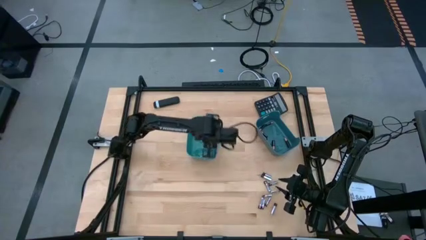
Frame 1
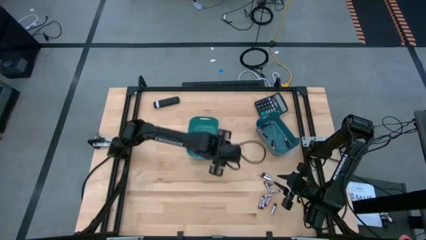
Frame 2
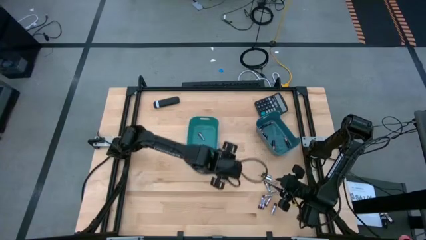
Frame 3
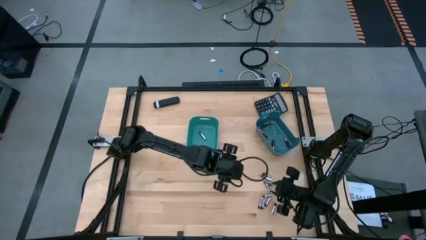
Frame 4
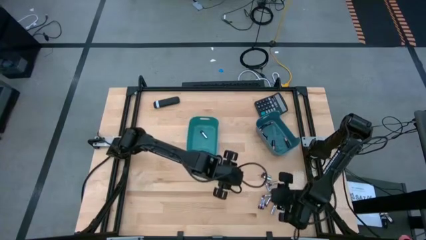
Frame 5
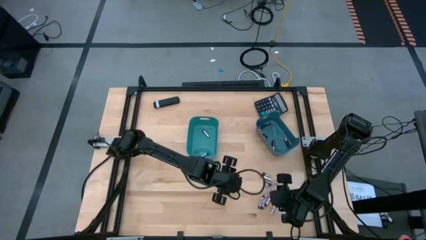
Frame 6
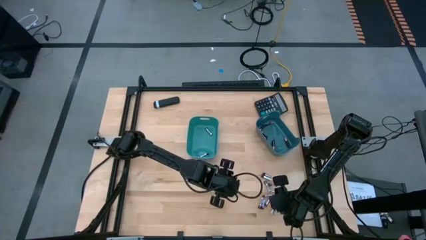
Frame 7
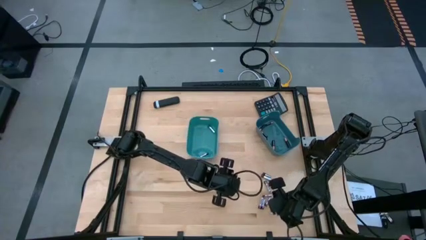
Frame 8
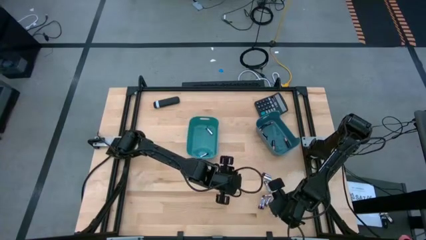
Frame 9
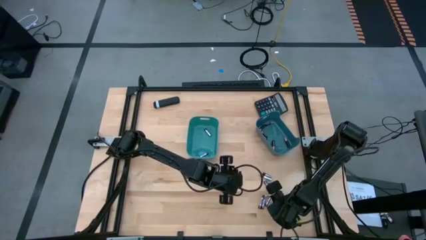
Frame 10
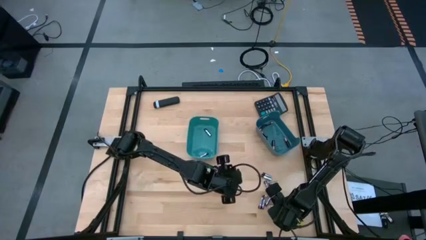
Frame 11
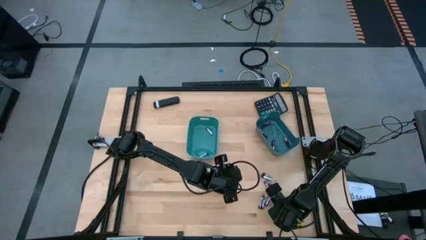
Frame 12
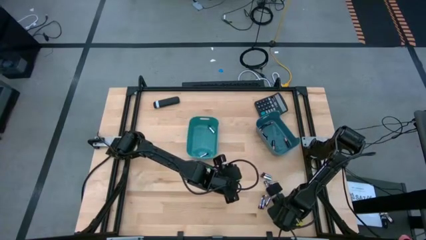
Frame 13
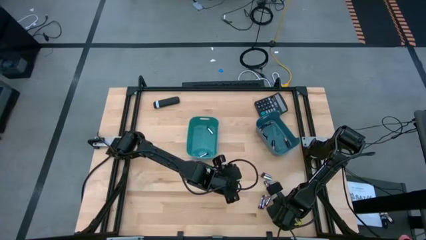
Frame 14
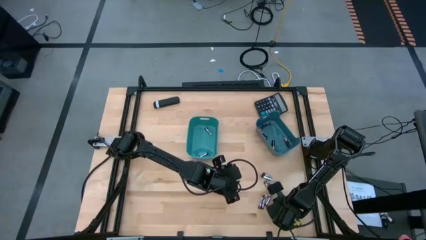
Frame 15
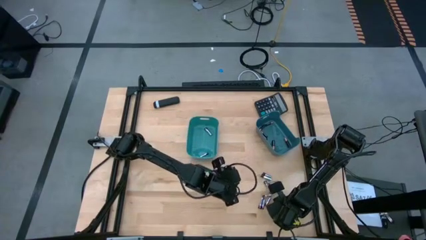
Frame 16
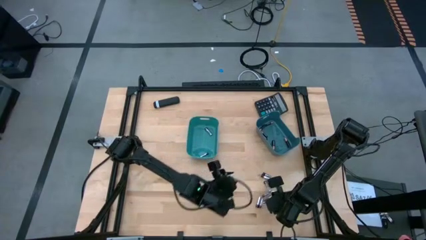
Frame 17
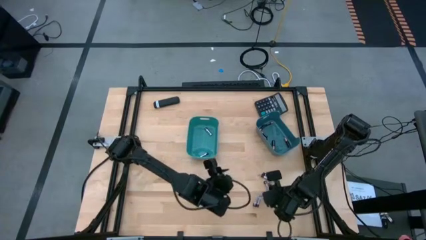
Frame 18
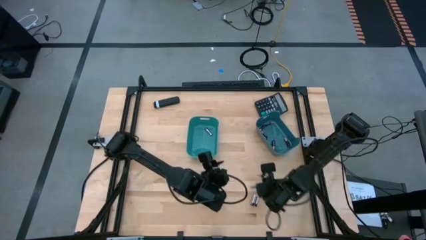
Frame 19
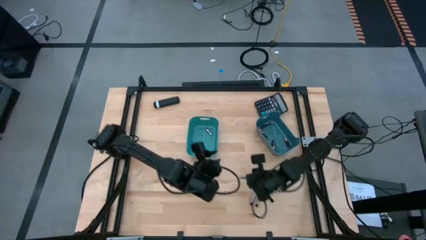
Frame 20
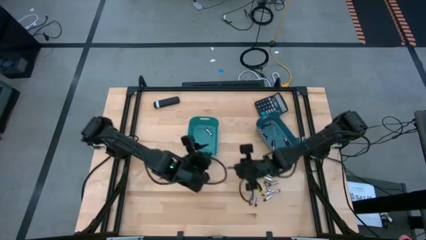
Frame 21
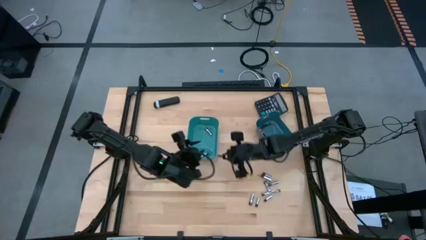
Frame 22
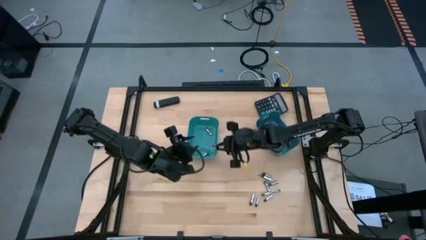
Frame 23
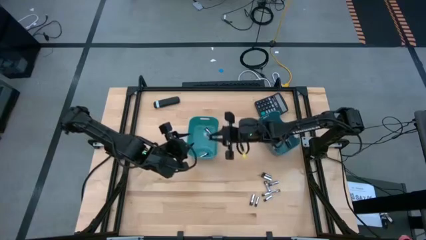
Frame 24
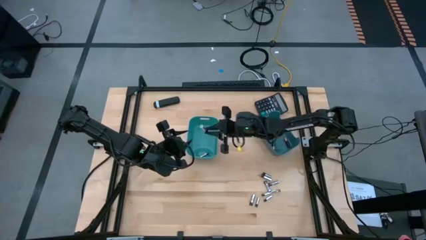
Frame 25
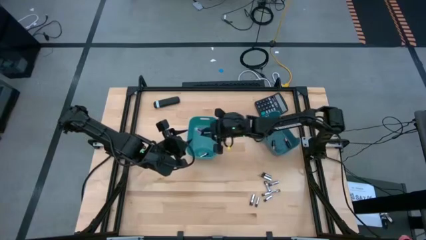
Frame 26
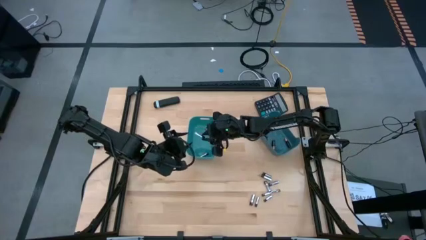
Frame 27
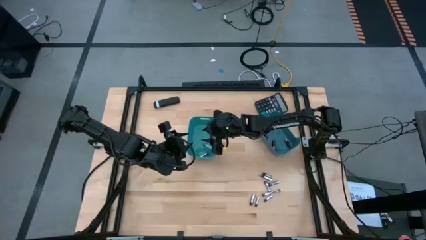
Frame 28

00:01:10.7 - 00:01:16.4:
Task: Sort batteries
Put the silver battery into the green bin

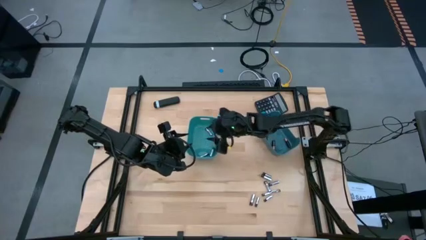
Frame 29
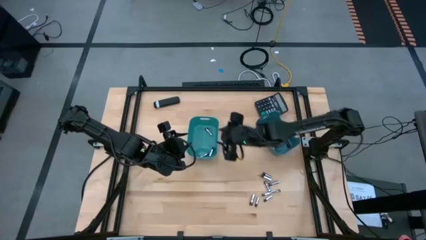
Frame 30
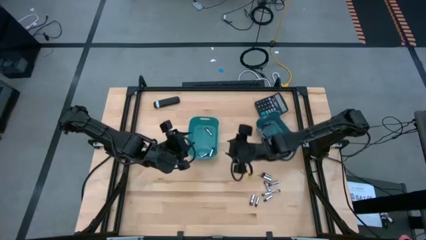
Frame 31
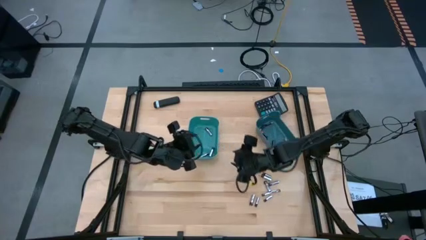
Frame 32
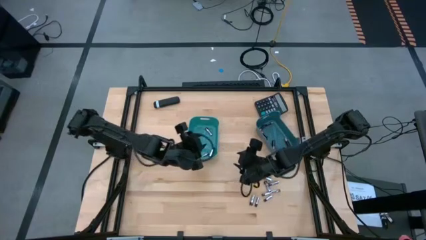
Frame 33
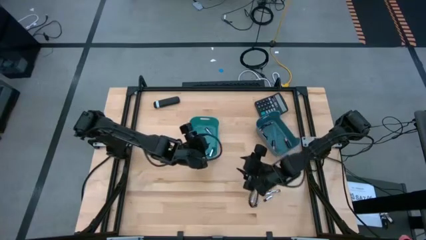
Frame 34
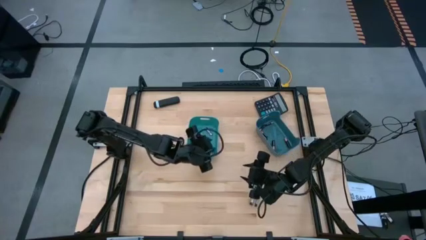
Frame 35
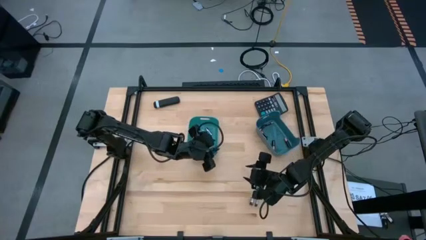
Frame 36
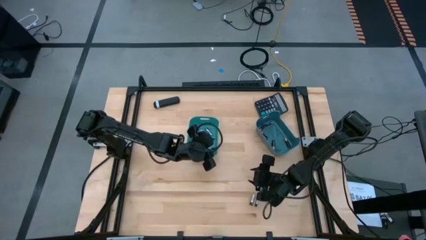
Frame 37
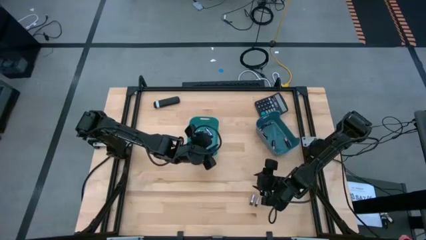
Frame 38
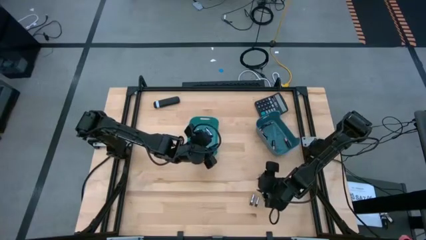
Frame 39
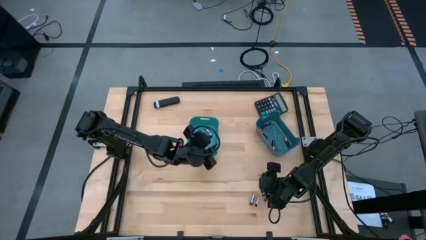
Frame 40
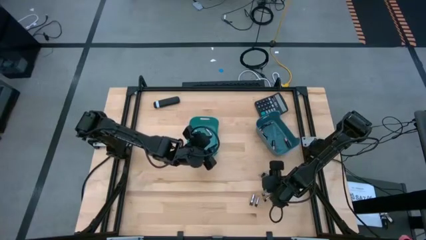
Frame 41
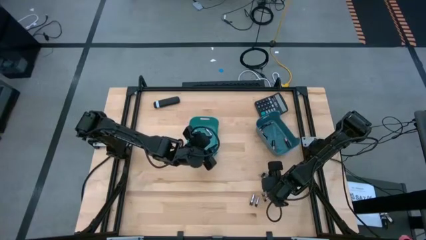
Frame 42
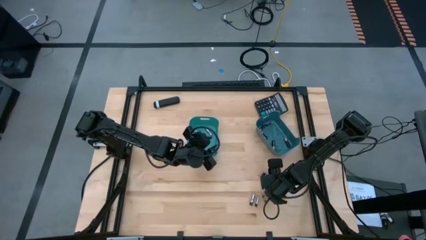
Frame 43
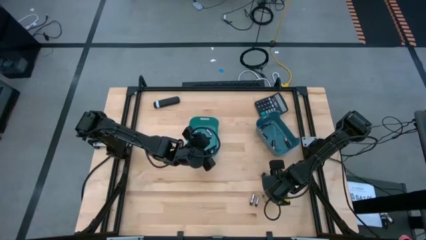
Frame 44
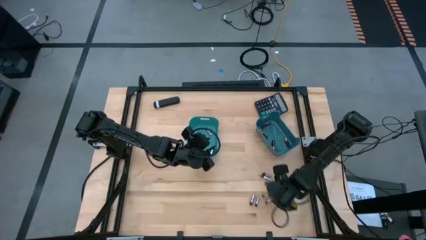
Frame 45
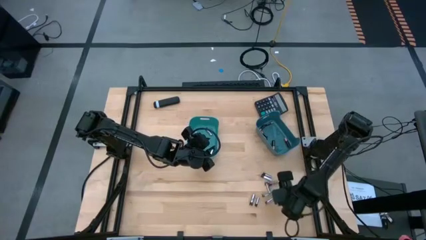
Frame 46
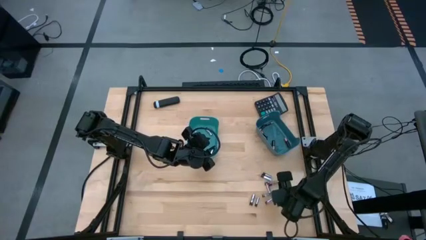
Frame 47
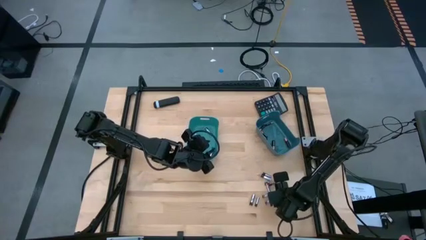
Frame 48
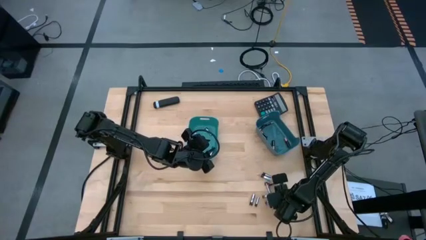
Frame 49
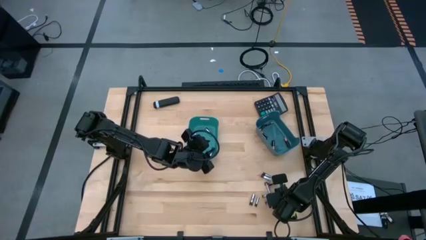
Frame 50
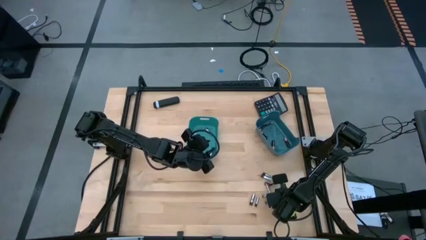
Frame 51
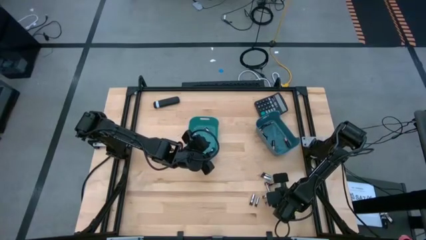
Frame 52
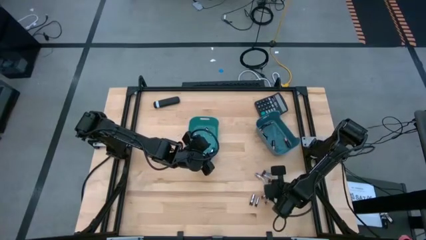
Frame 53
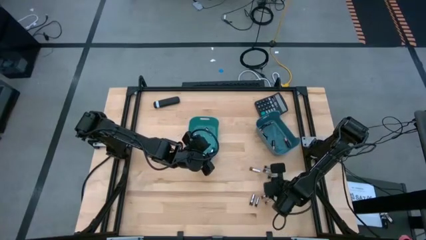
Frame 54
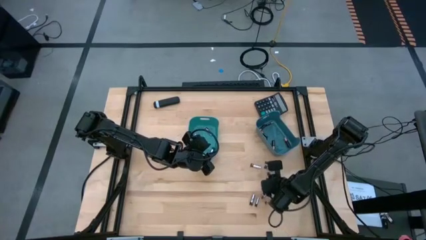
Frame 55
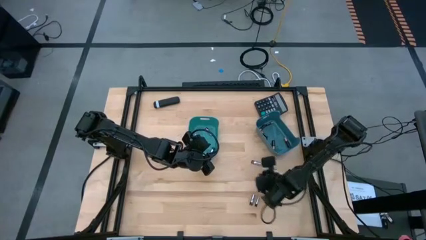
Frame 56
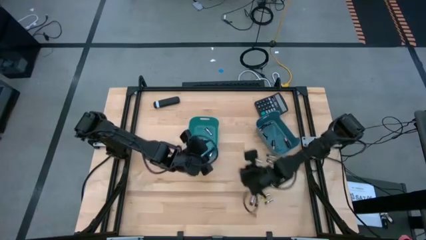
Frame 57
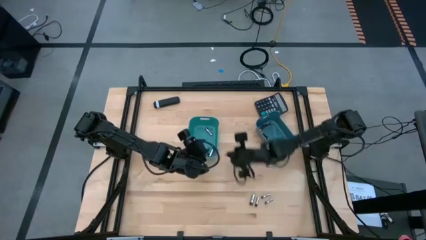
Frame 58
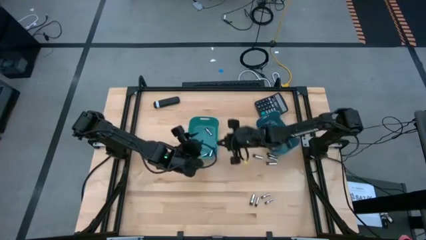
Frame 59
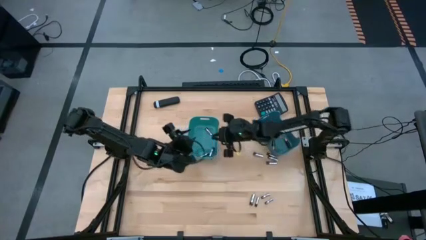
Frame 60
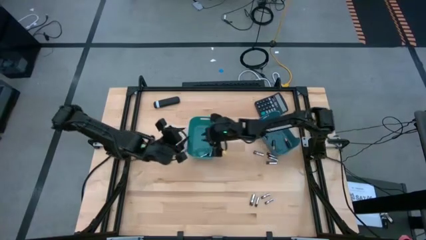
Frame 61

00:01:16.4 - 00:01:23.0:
Put the silver battery into the green bin

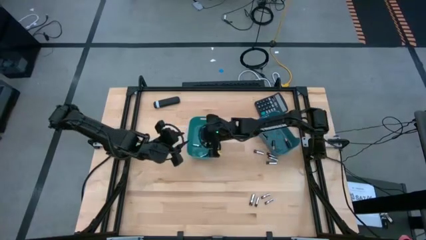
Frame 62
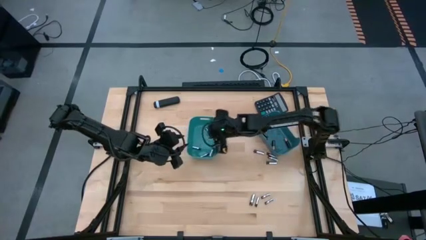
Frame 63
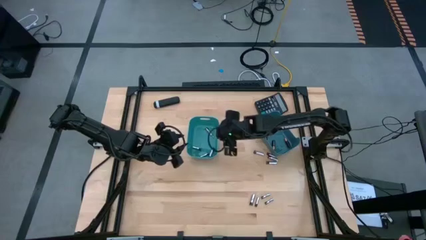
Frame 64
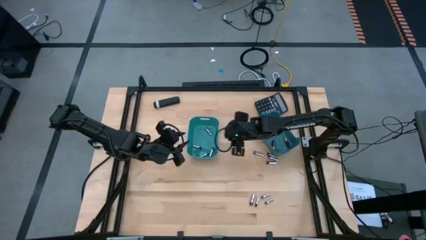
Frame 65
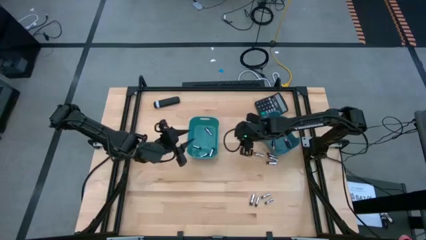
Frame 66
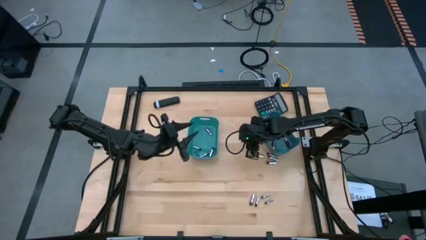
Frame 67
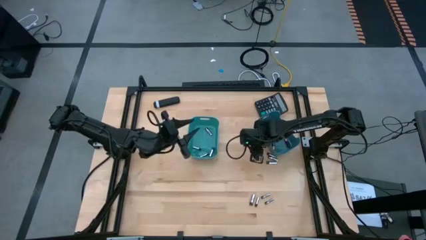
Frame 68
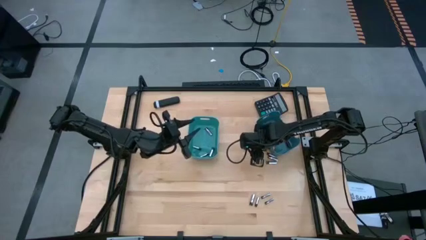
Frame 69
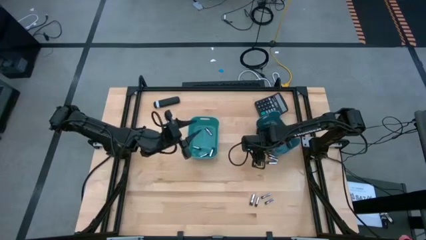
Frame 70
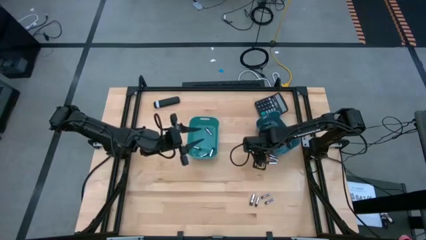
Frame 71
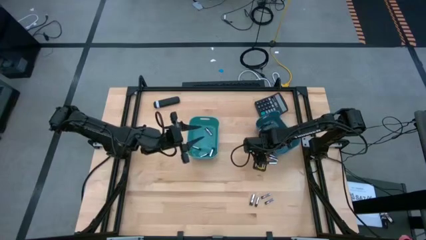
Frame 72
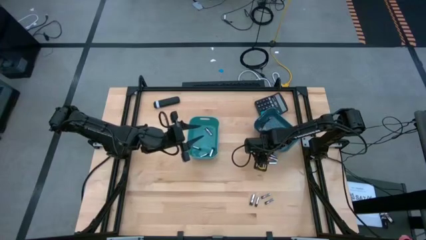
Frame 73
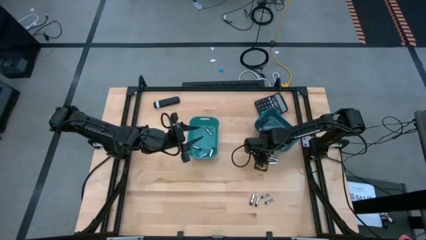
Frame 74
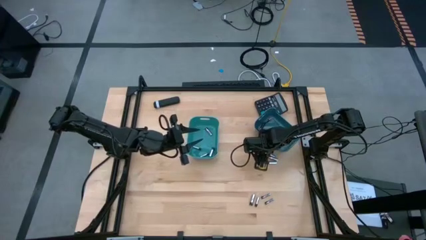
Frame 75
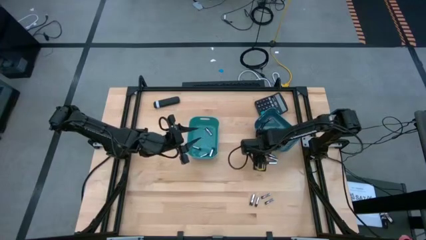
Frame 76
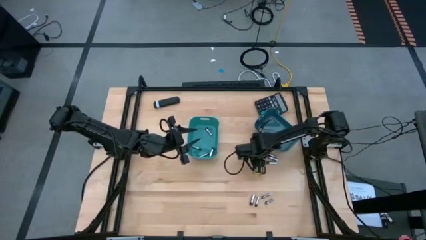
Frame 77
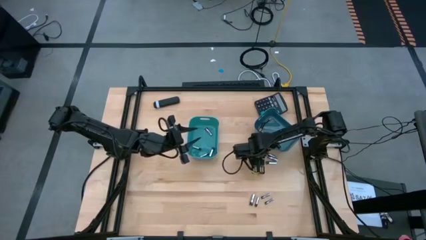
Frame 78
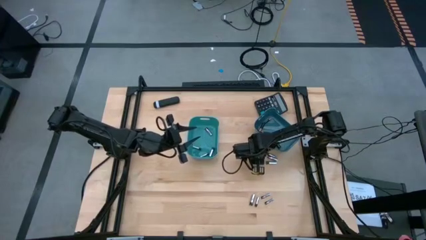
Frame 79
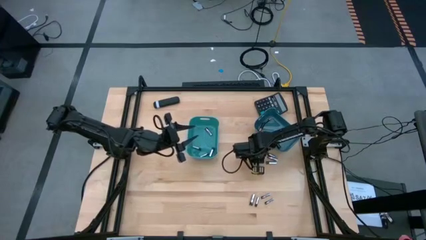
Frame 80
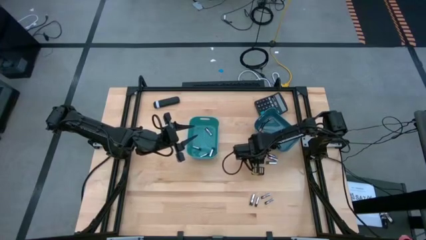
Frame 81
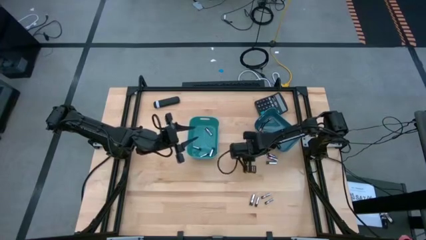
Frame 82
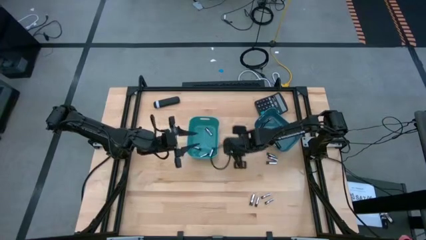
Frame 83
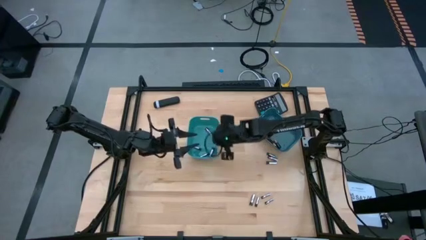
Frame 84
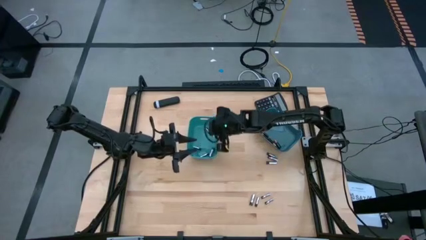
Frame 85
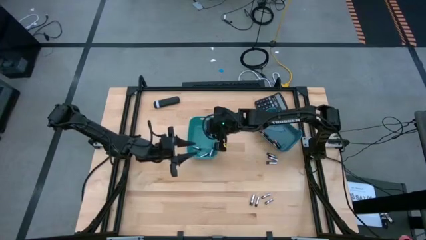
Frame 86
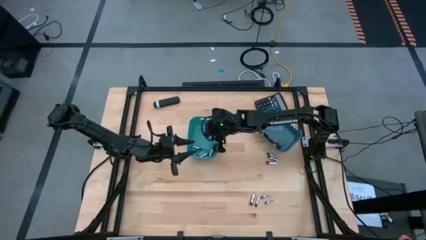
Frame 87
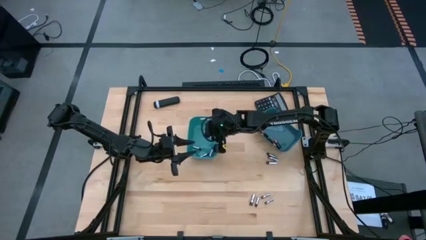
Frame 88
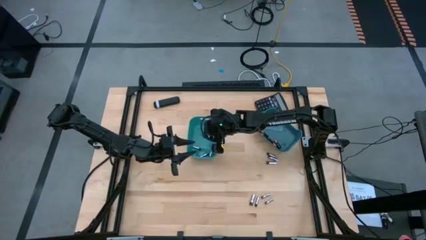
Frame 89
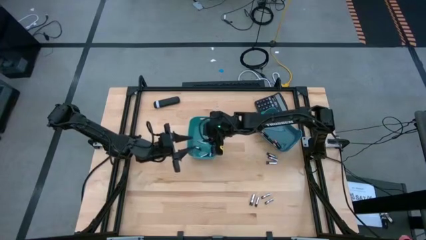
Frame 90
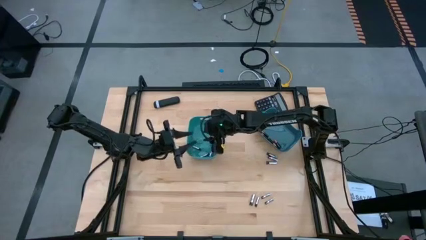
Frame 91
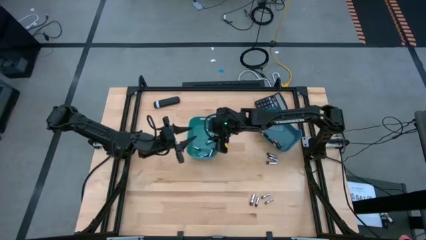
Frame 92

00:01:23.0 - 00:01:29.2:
Put the silver battery into the green bin
